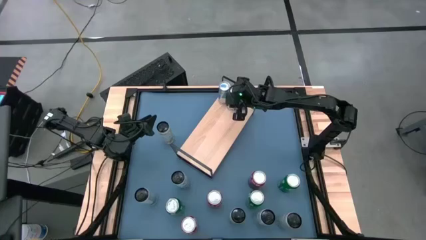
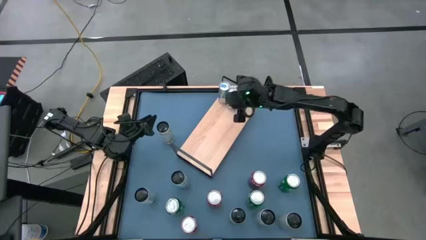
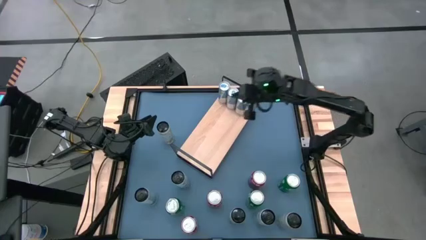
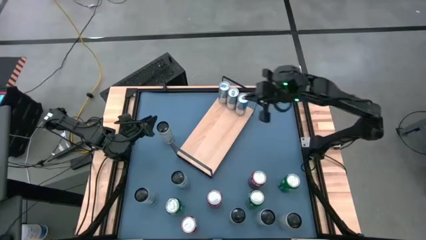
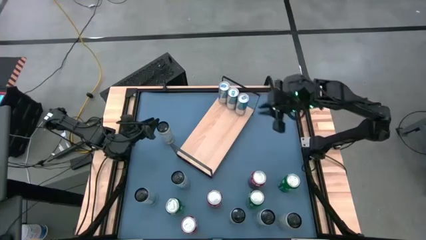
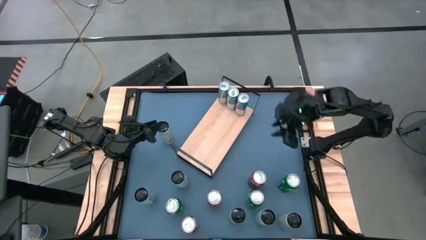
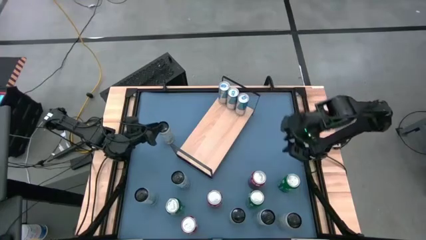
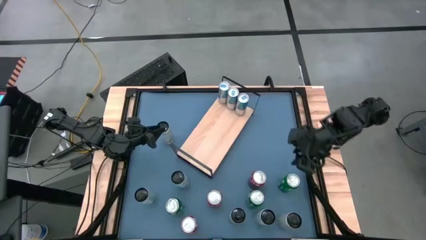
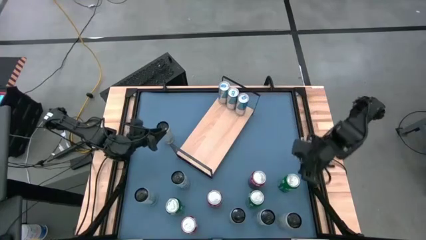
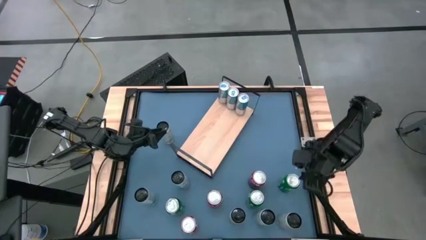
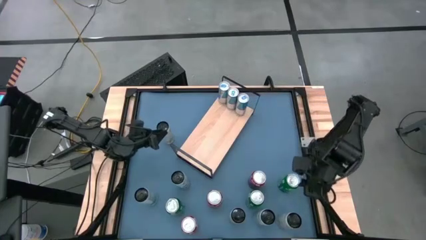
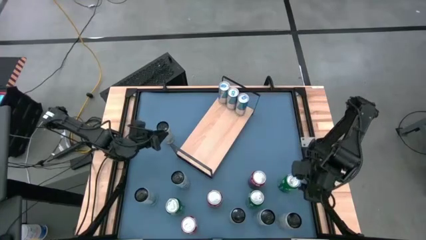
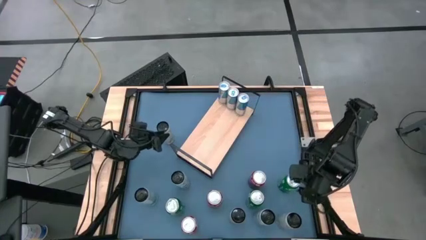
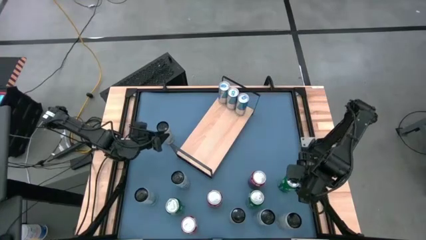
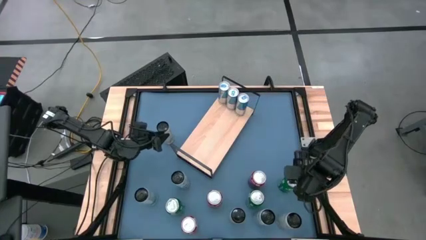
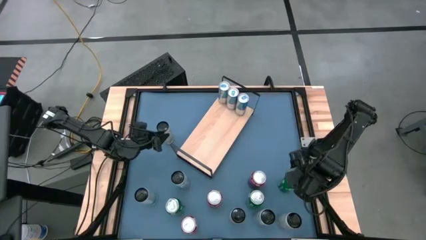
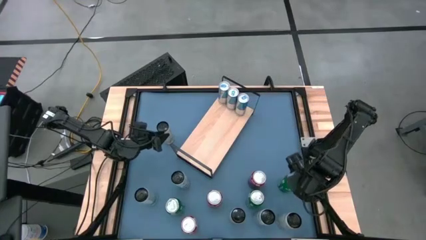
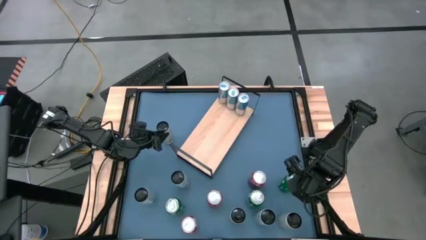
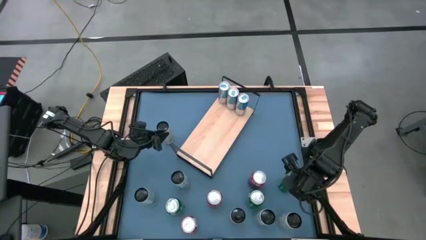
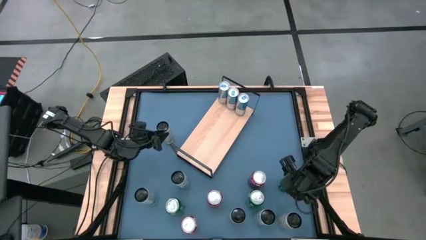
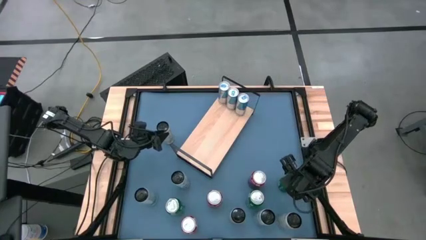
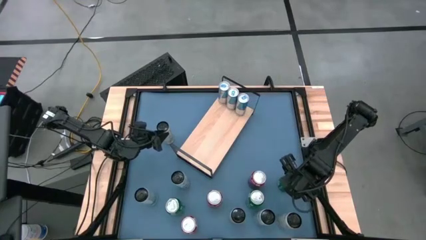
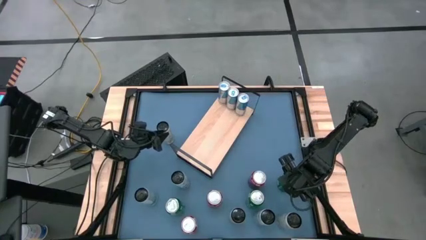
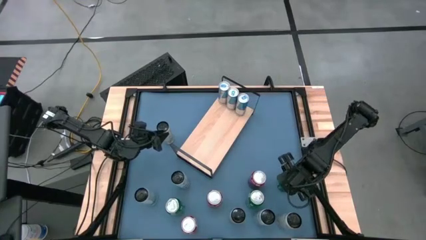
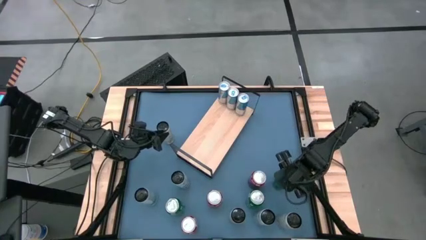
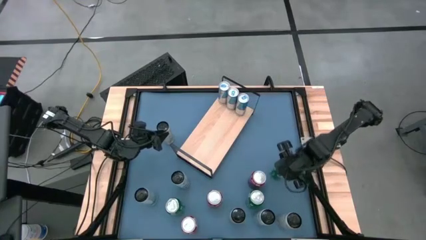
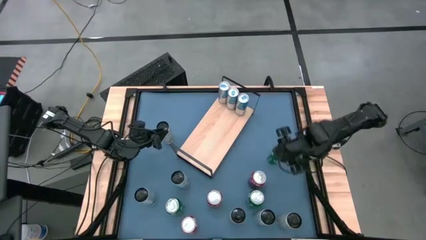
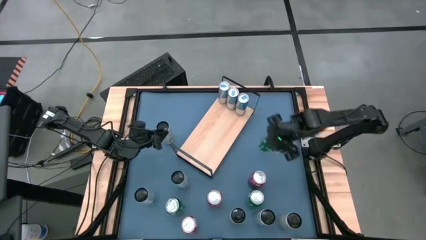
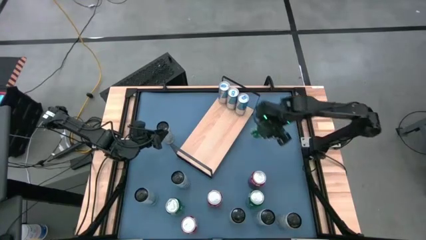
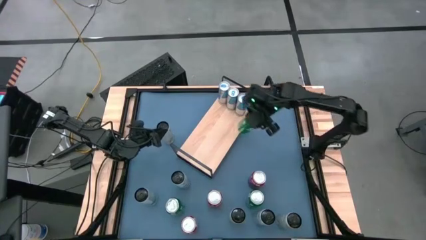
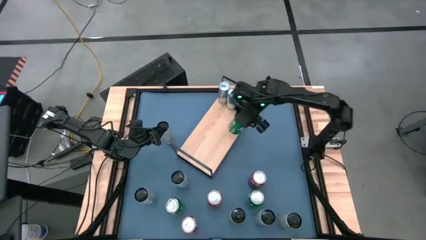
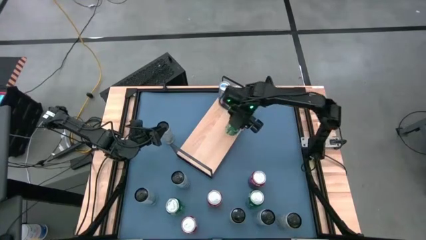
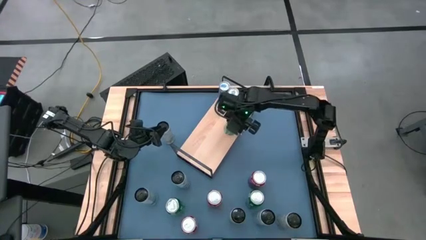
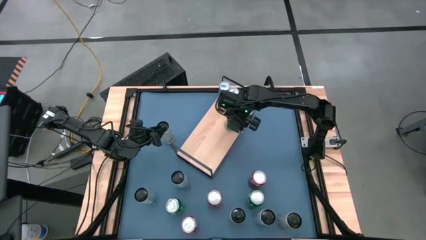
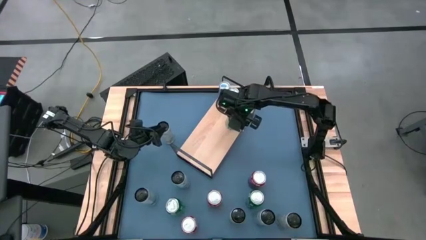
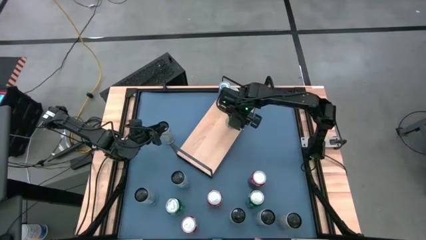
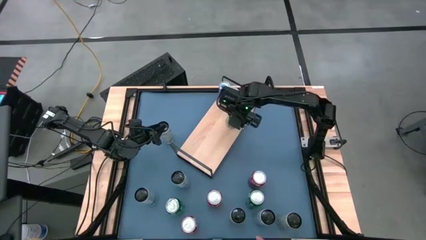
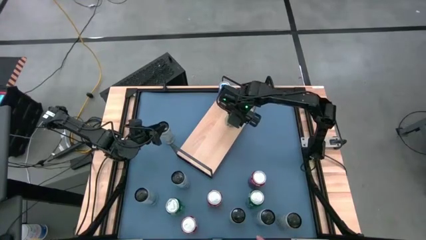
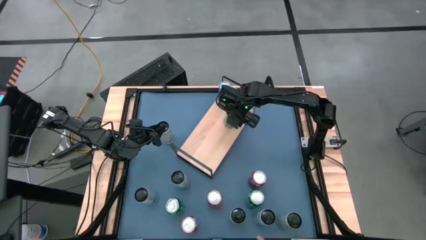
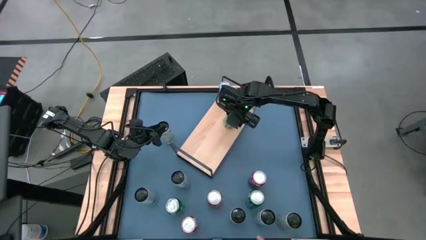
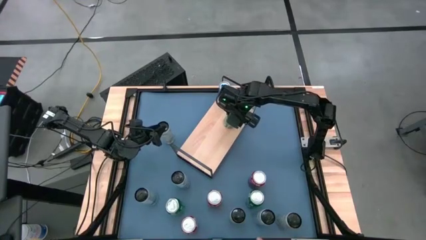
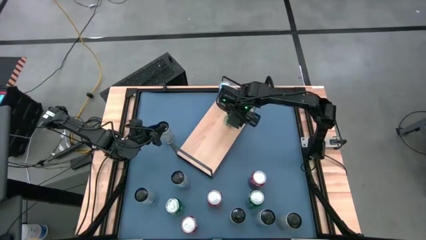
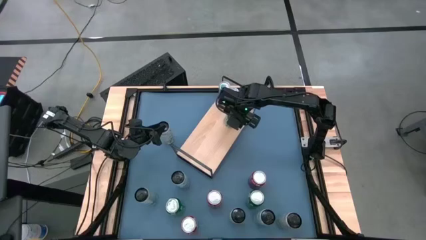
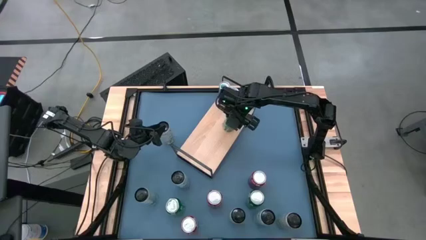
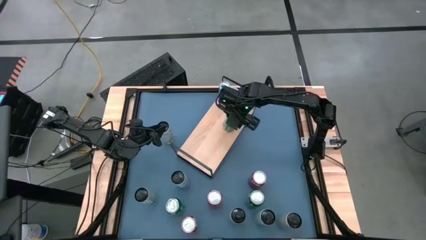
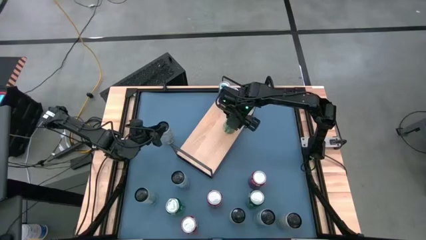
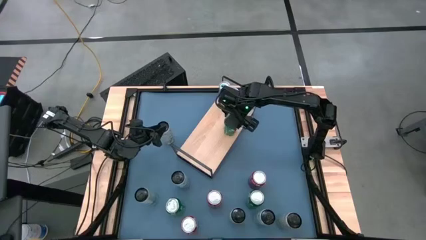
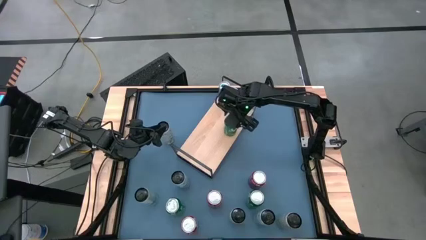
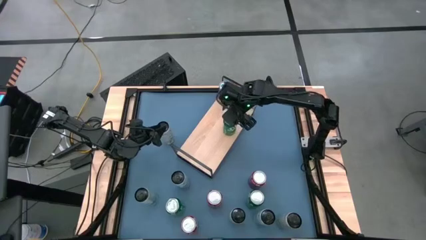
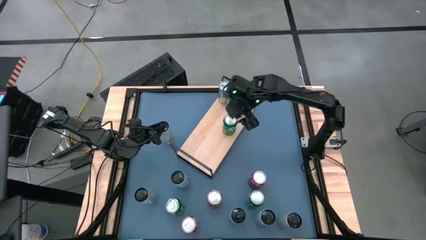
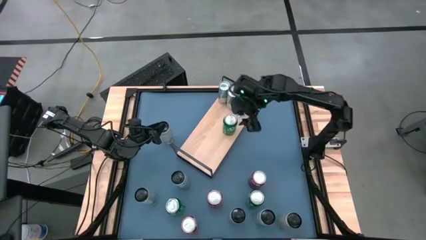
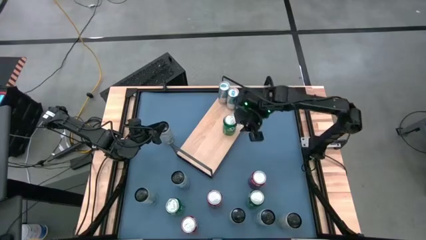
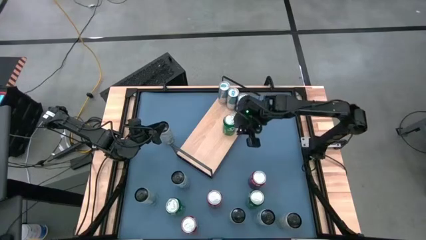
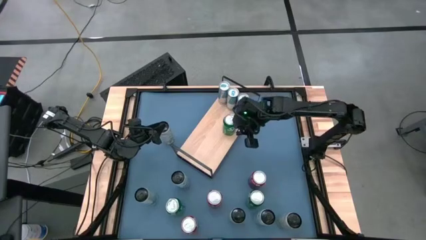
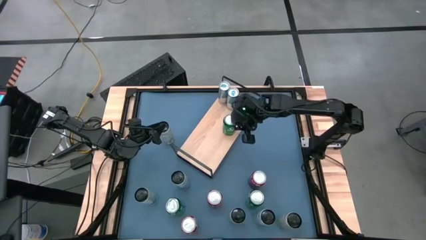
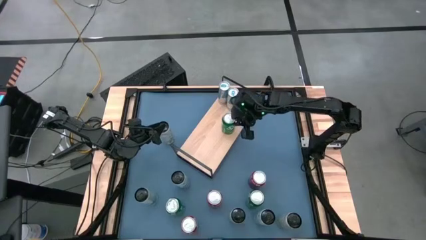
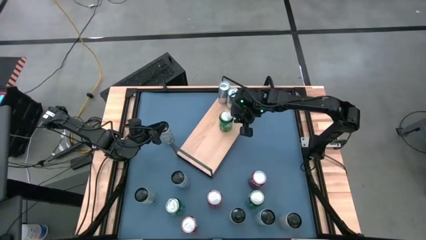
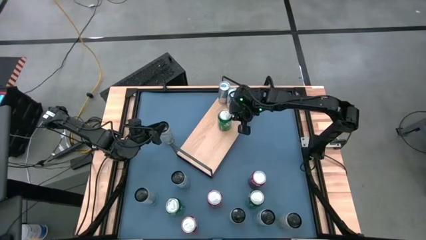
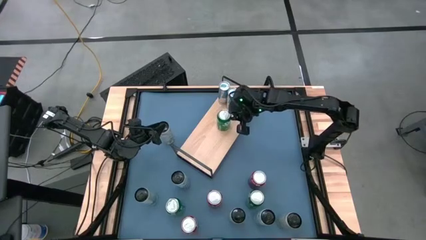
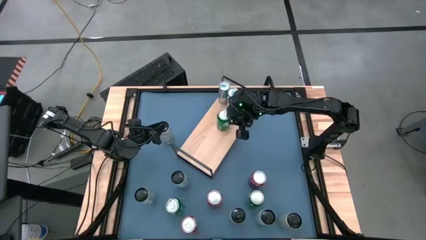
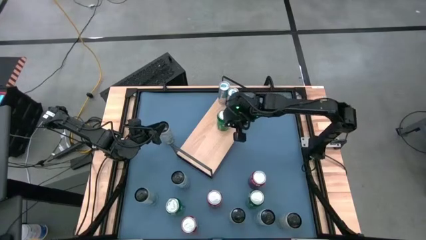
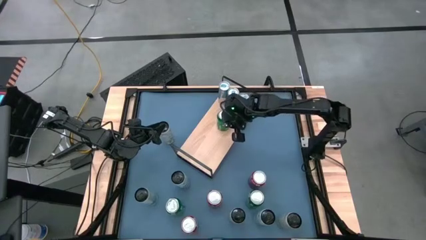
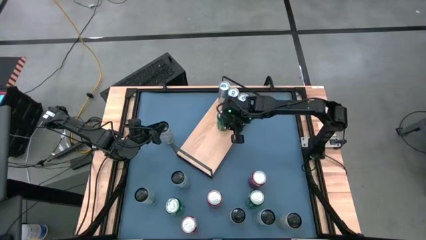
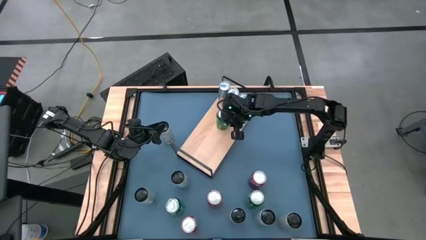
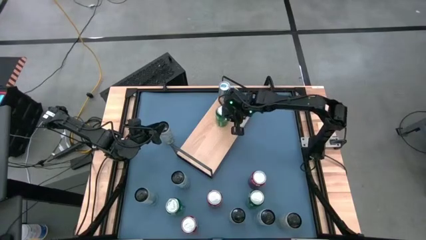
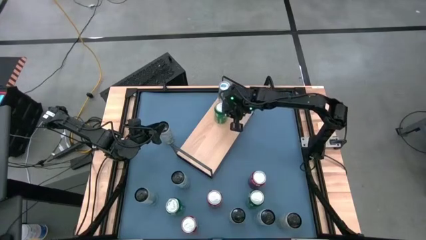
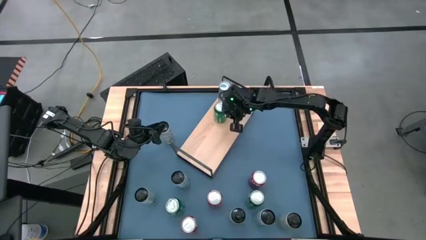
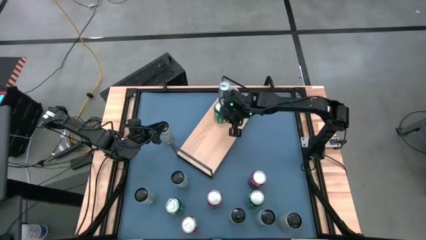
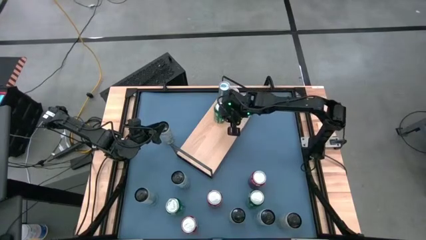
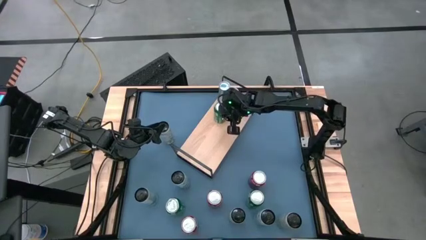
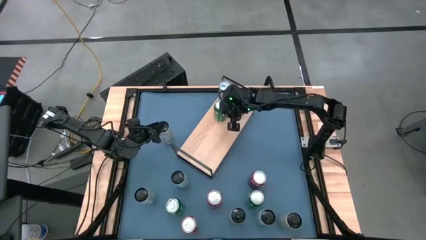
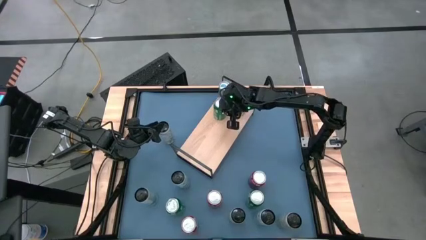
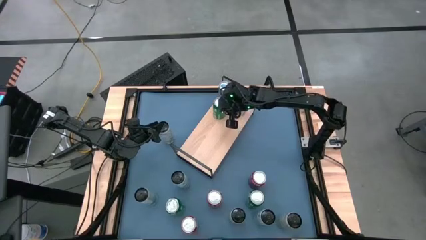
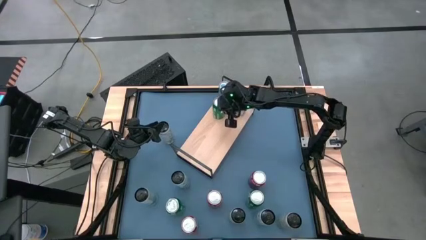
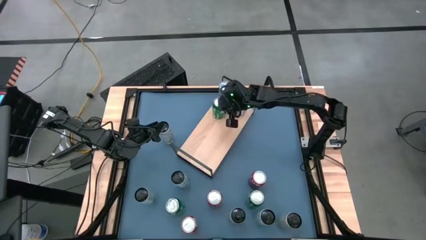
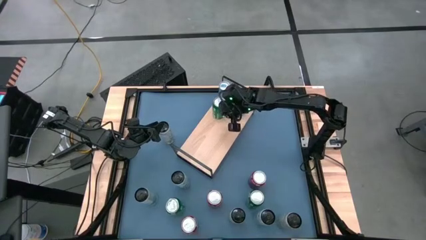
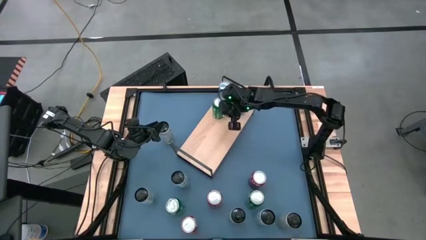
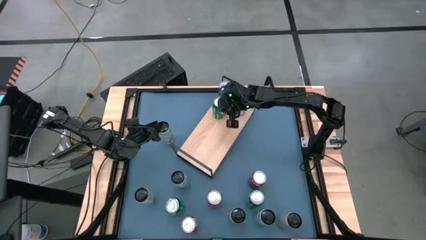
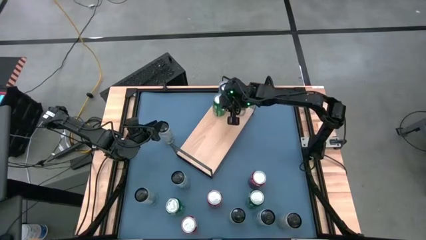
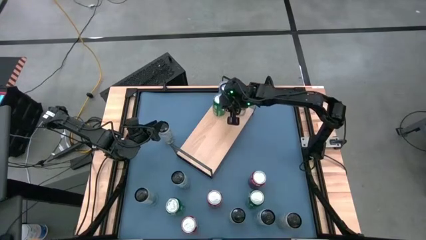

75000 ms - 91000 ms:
Task: Place canned beverage on shelf
Put the right green soda can on the shelf
